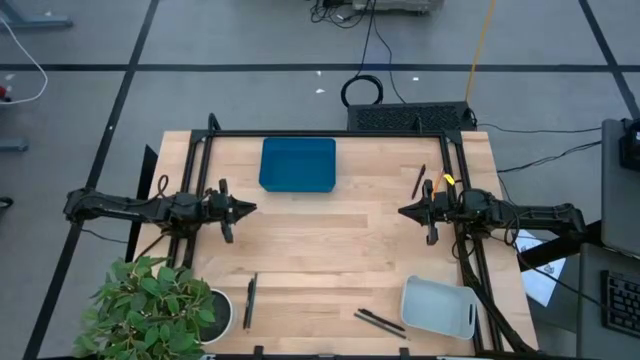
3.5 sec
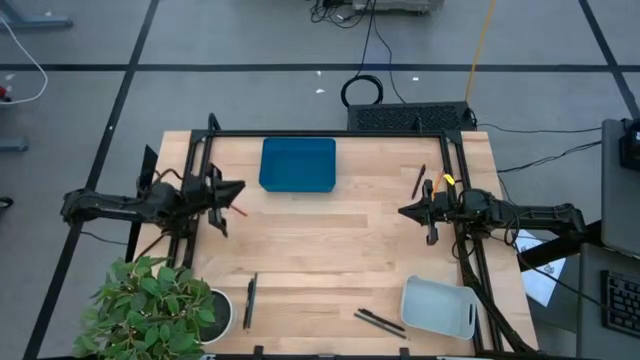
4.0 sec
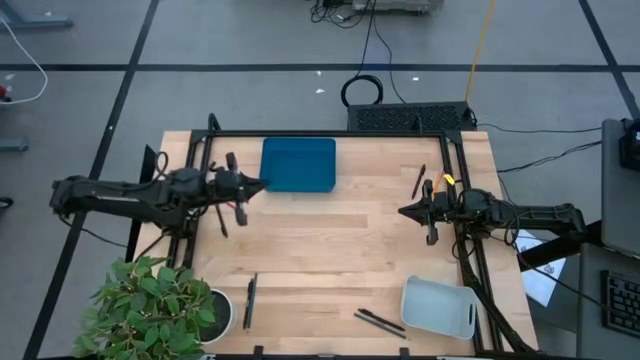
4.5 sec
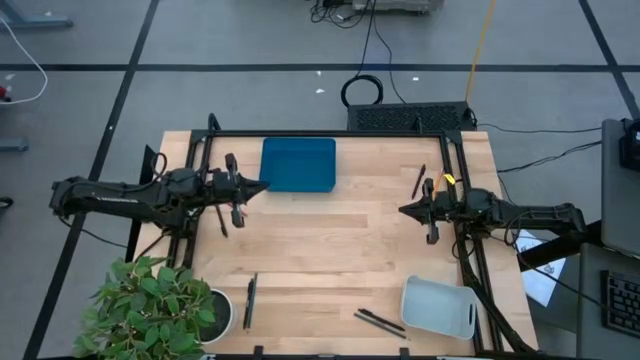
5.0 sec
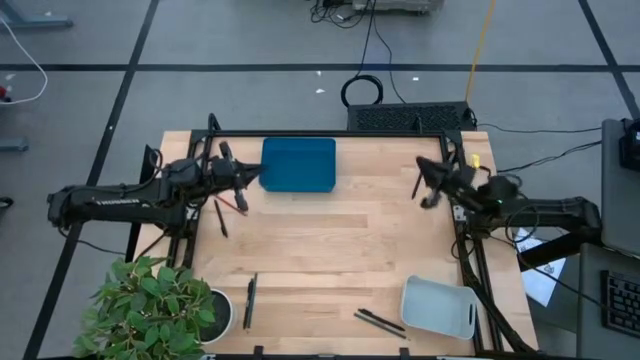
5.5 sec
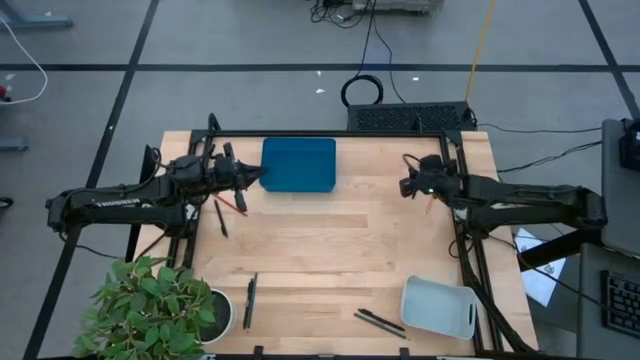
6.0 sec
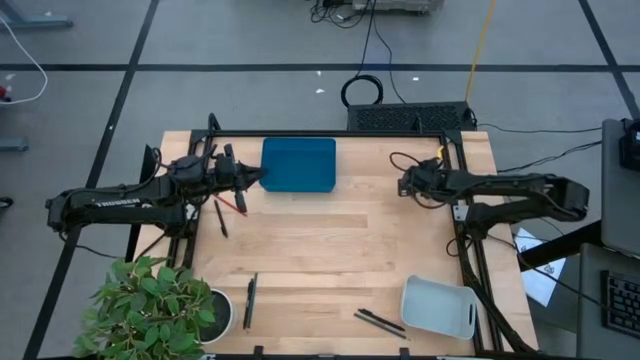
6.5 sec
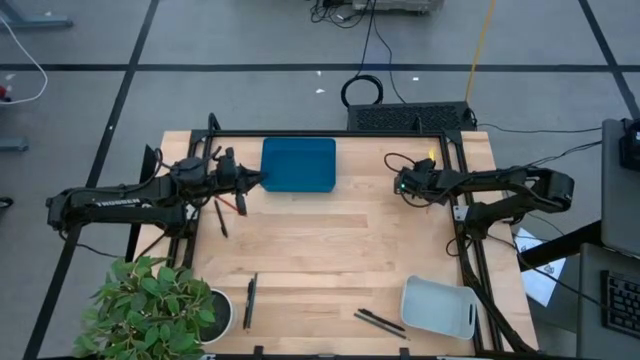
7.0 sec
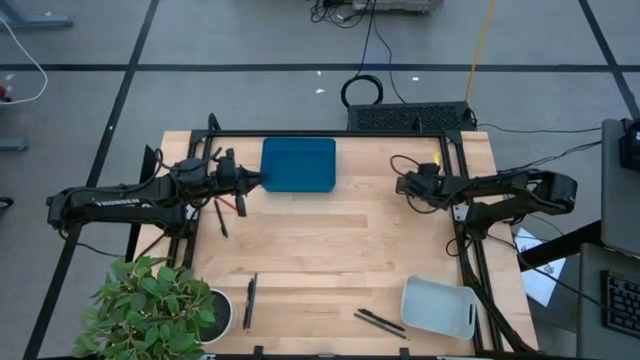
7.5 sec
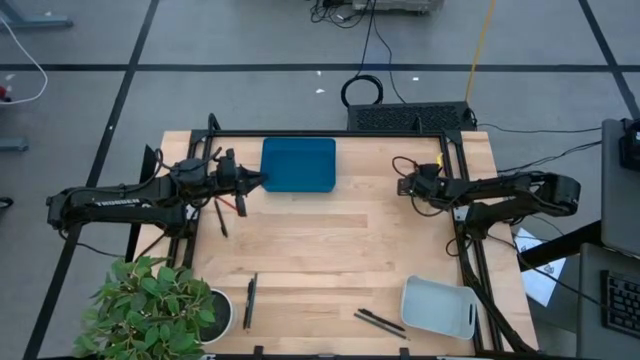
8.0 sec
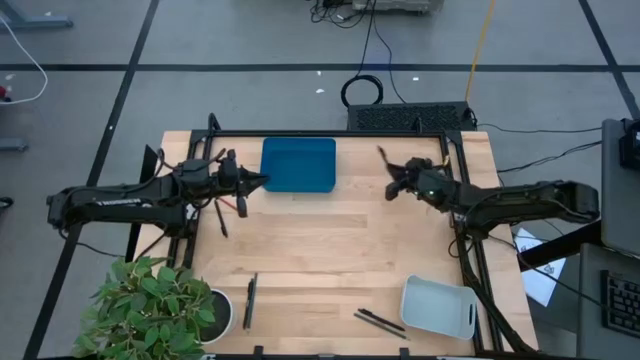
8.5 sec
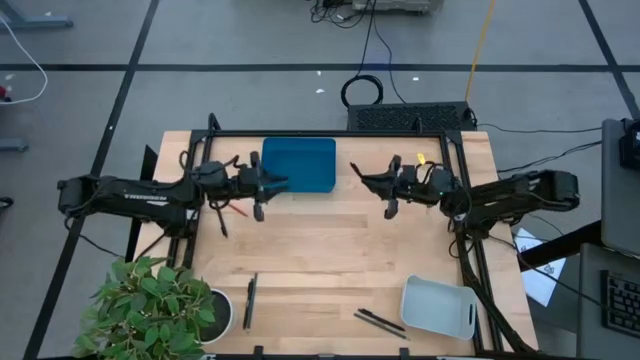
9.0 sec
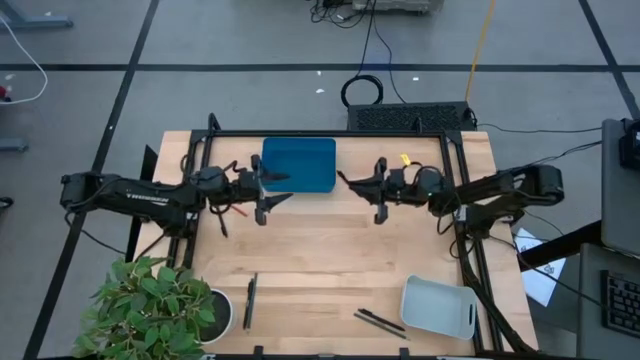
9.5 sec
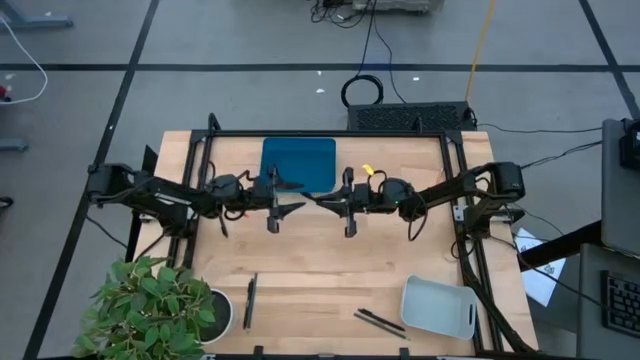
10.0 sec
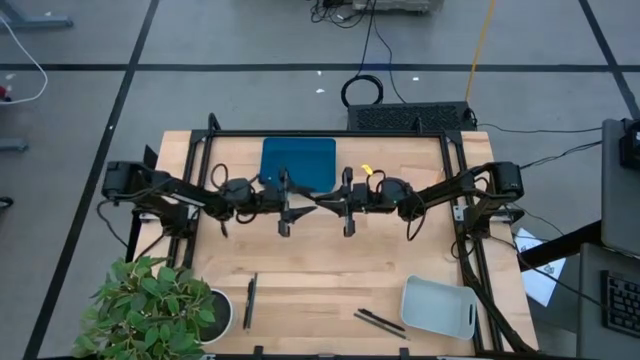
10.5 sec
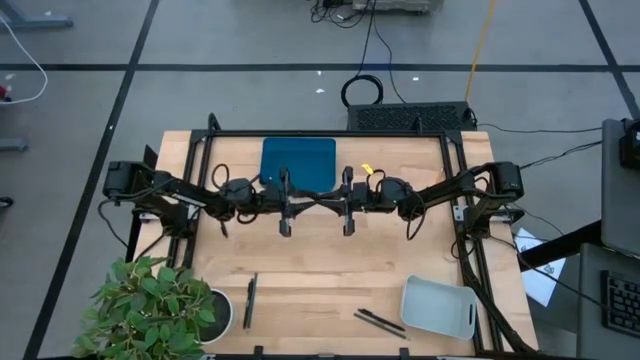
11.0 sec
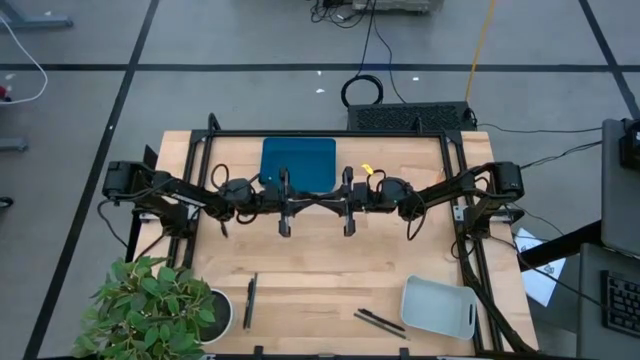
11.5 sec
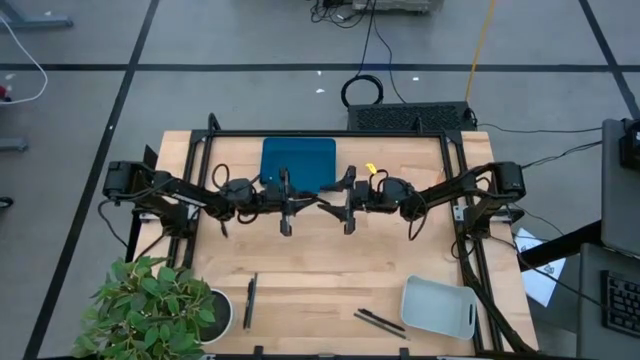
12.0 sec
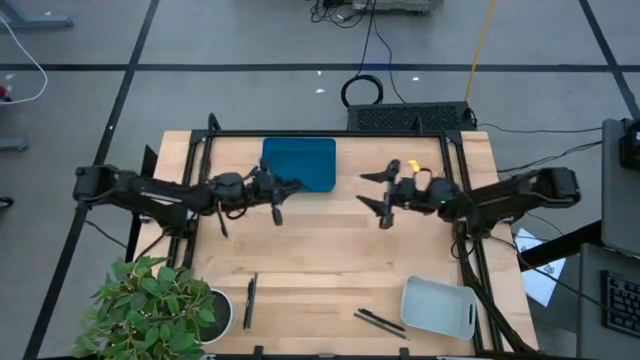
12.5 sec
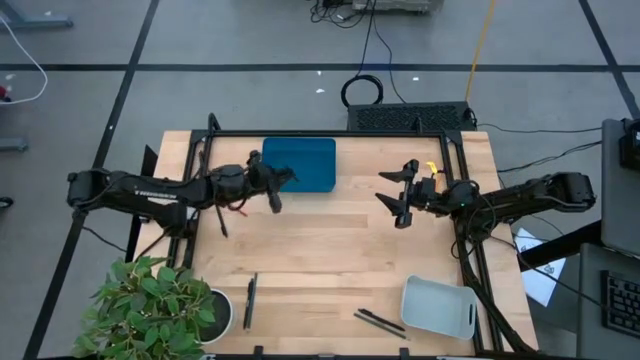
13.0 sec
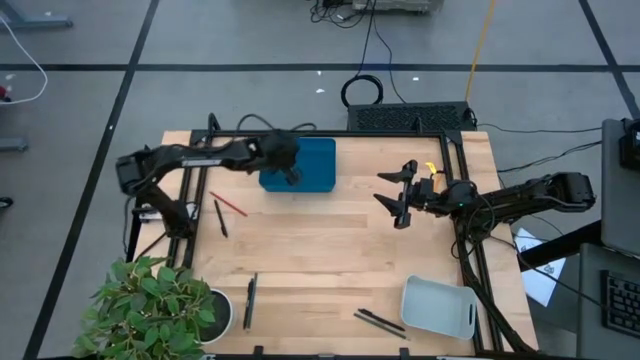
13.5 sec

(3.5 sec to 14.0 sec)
Task: Sort pens & pencils
Put the top right black pen into the blue bin

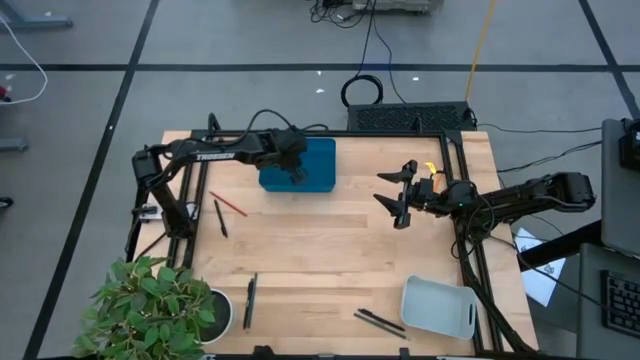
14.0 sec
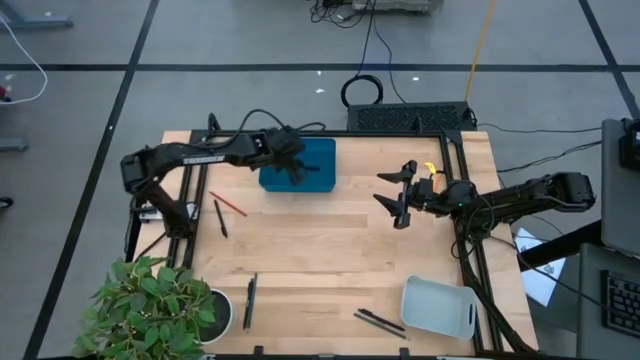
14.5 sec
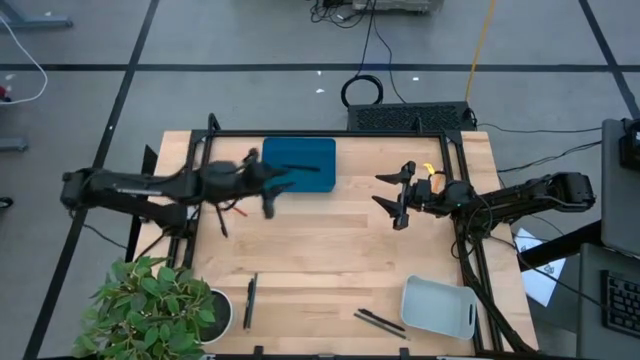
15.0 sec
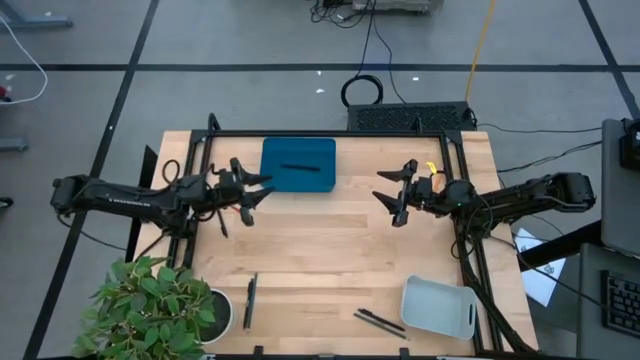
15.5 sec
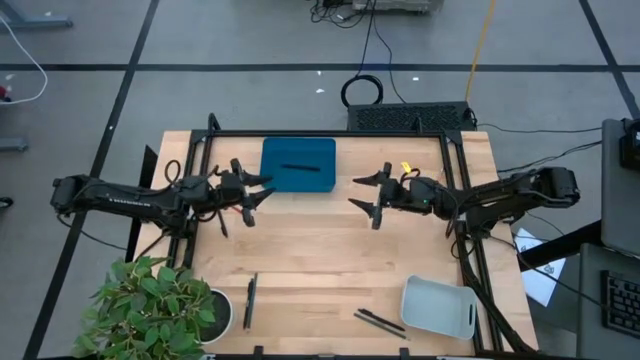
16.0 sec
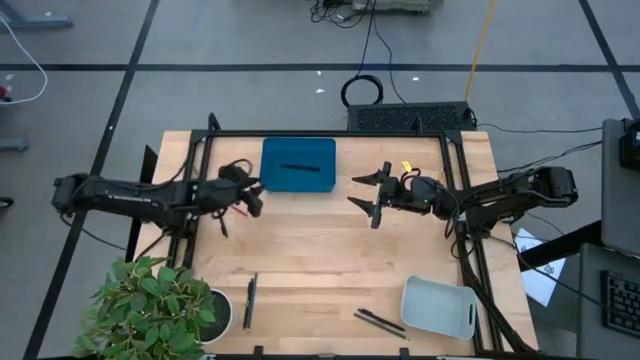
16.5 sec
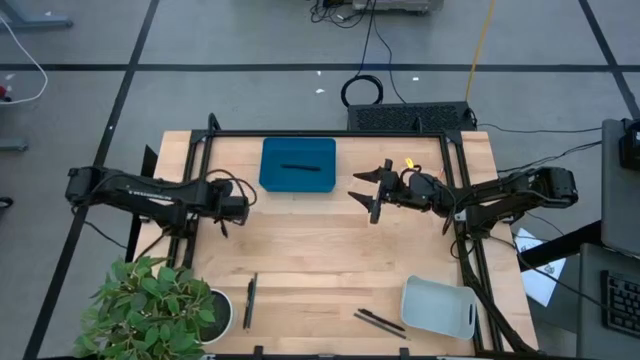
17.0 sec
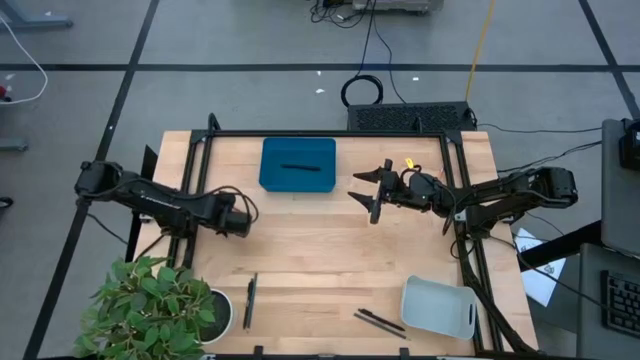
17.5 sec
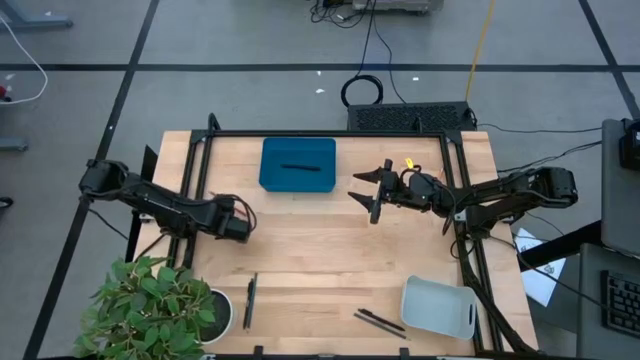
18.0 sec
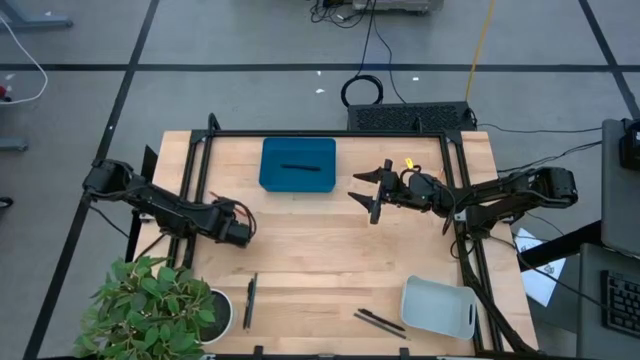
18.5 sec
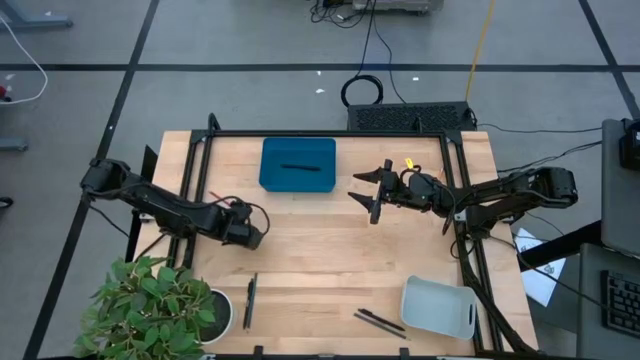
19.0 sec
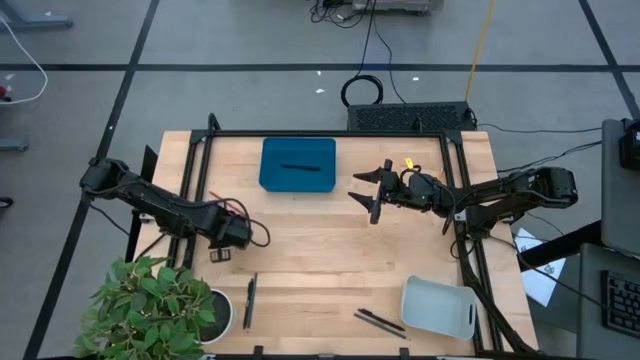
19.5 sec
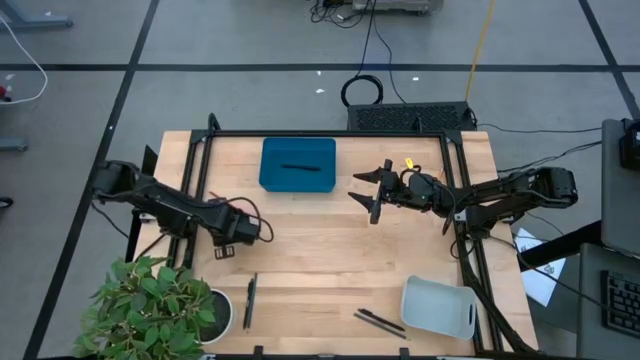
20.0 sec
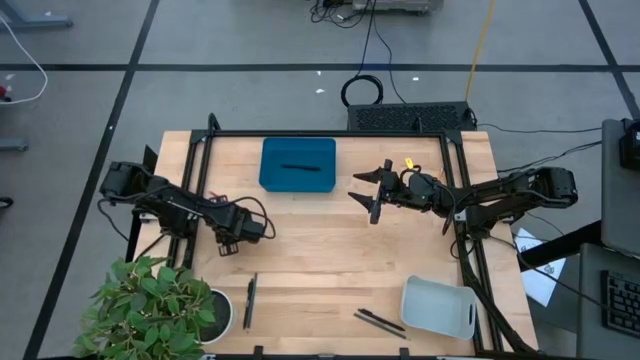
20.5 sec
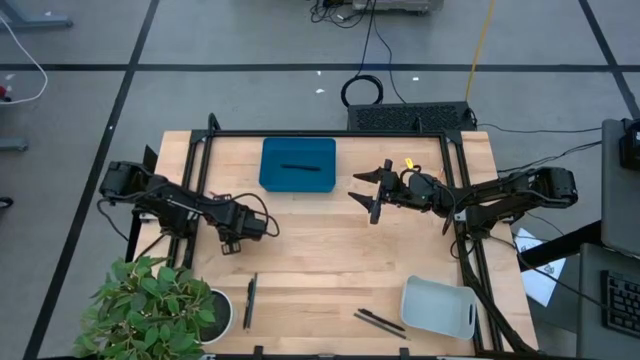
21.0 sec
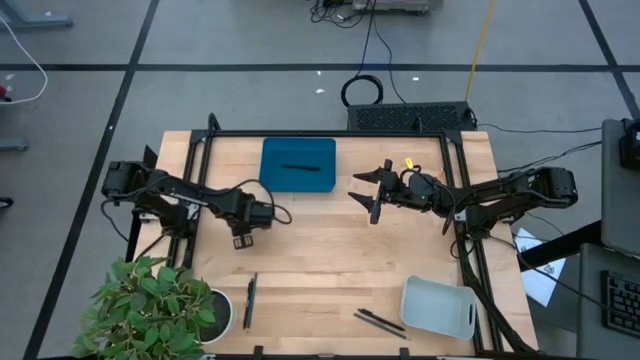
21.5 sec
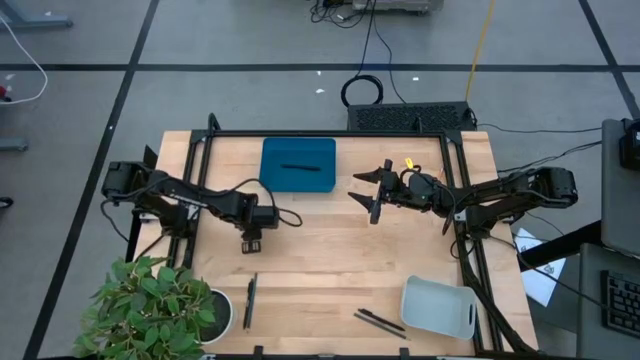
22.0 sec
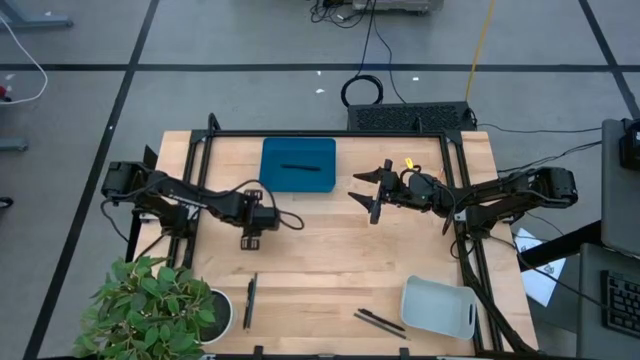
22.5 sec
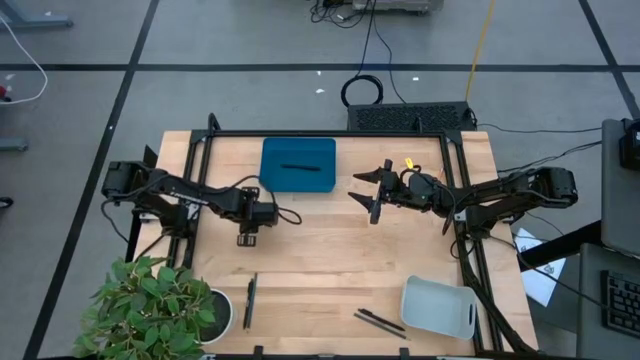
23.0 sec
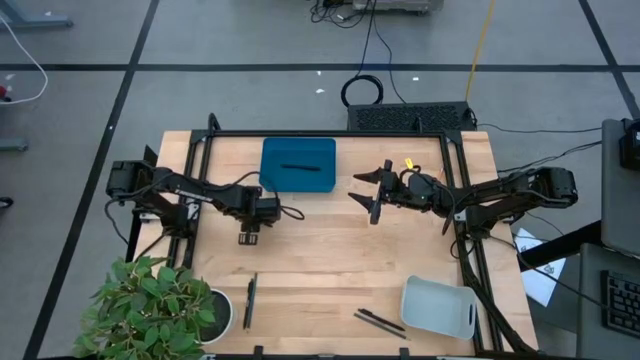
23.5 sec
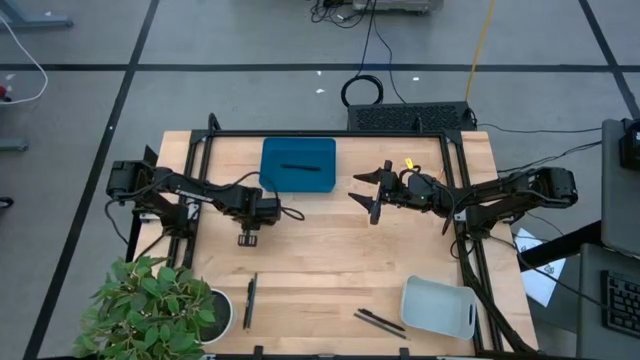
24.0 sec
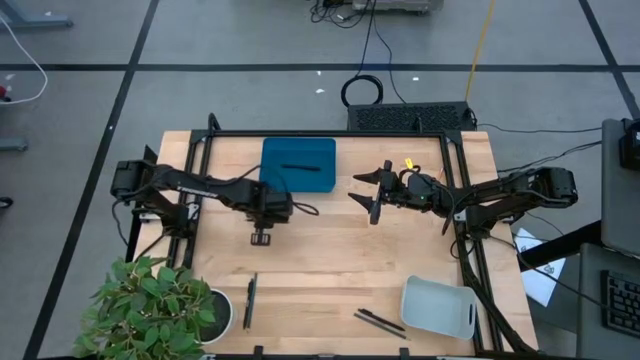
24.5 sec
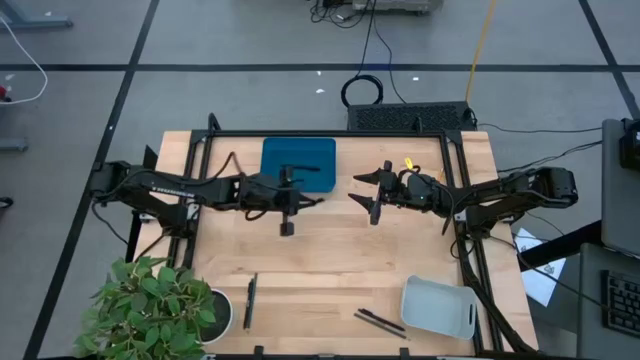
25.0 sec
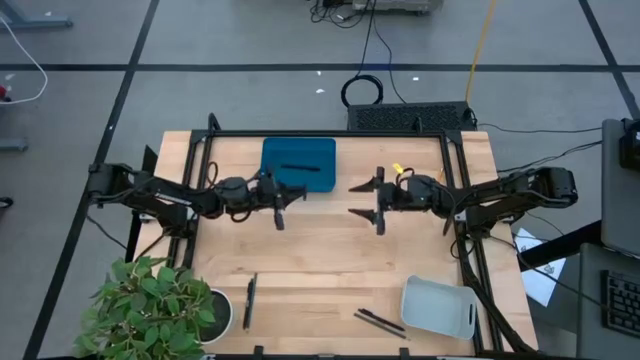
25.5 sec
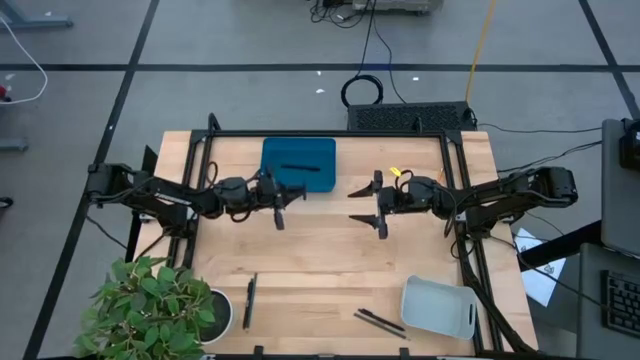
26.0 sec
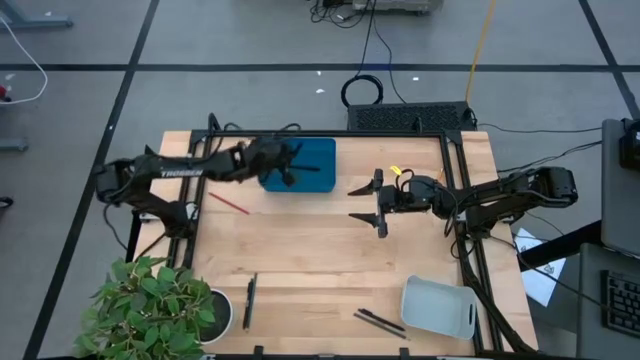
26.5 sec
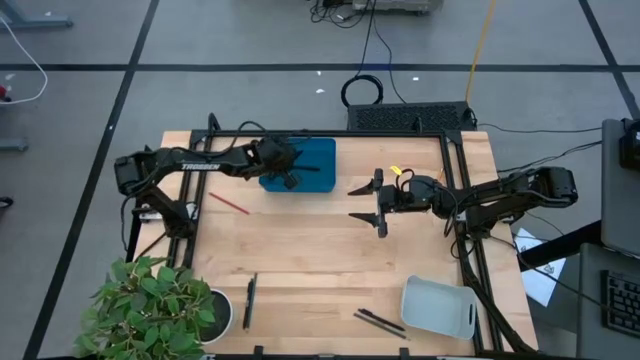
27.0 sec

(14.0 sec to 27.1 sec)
Put the top left black pen into the blue bin
